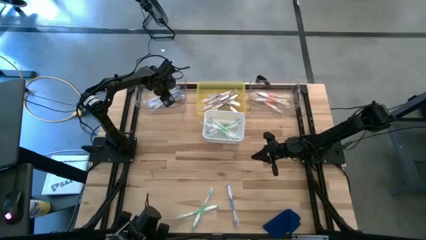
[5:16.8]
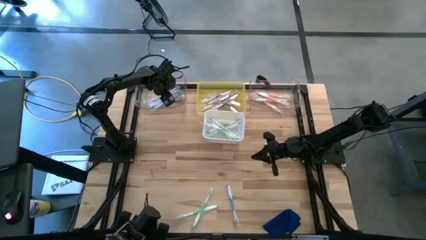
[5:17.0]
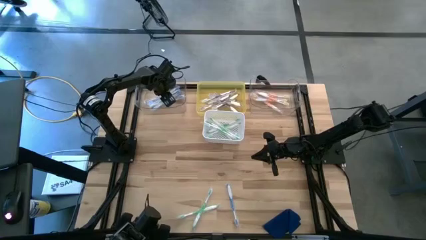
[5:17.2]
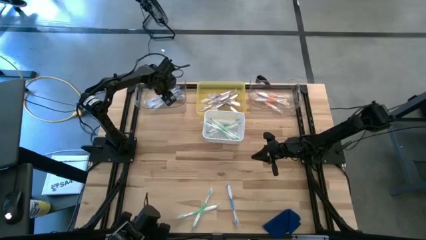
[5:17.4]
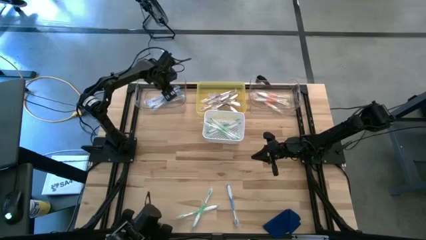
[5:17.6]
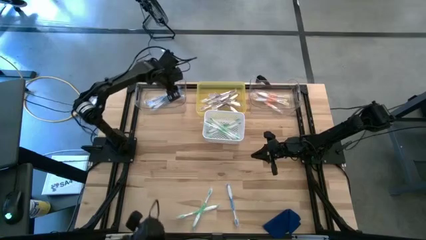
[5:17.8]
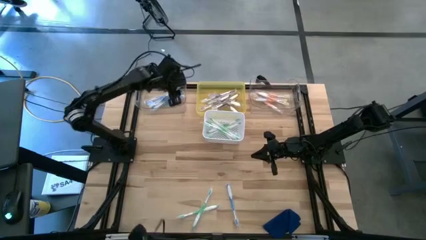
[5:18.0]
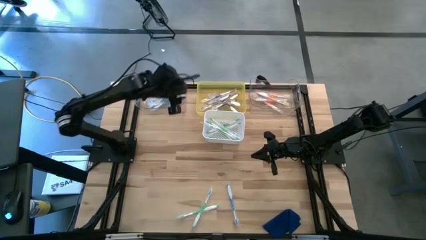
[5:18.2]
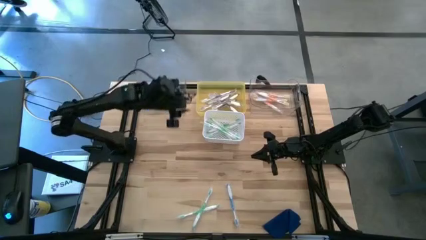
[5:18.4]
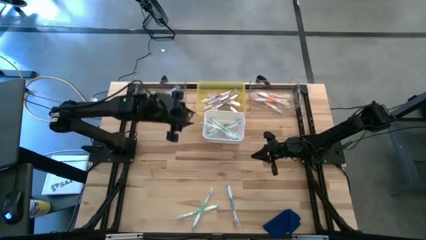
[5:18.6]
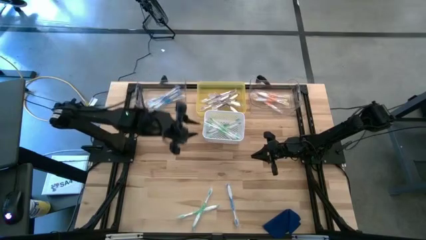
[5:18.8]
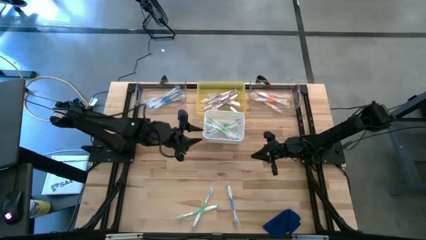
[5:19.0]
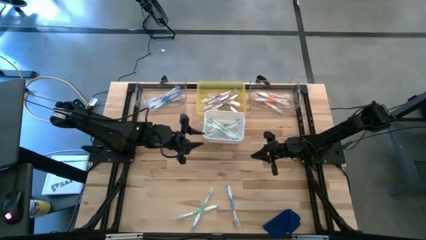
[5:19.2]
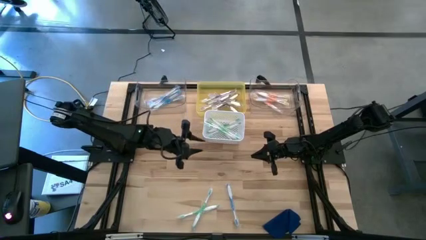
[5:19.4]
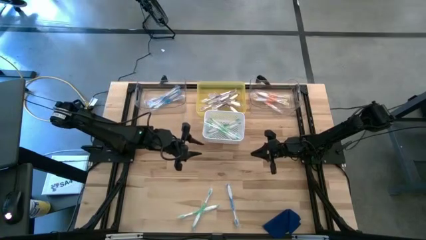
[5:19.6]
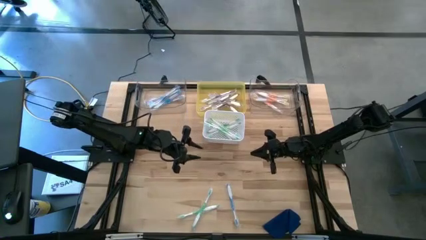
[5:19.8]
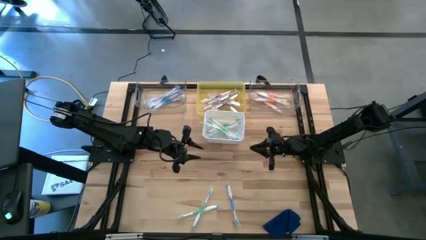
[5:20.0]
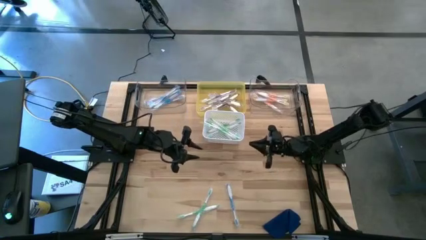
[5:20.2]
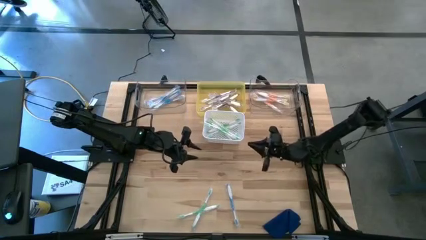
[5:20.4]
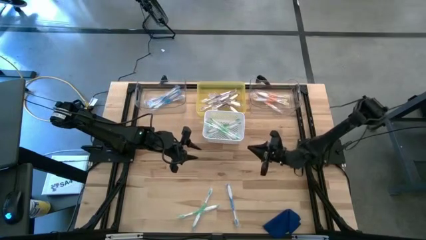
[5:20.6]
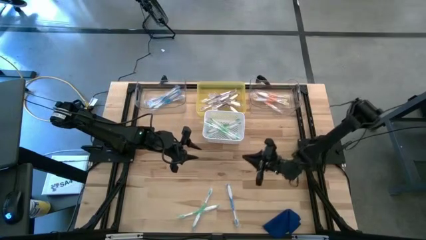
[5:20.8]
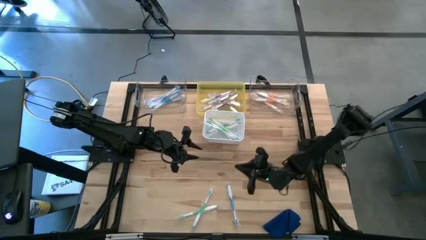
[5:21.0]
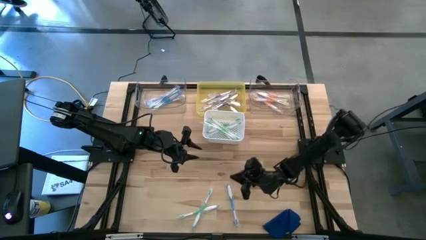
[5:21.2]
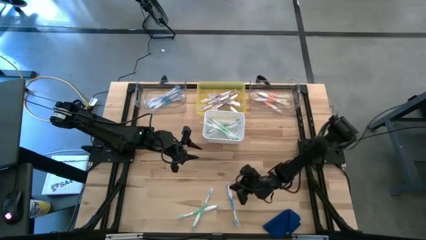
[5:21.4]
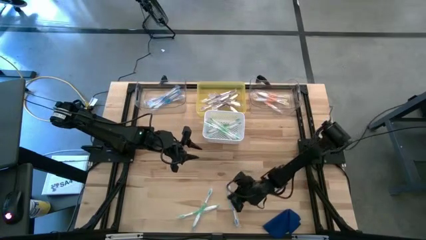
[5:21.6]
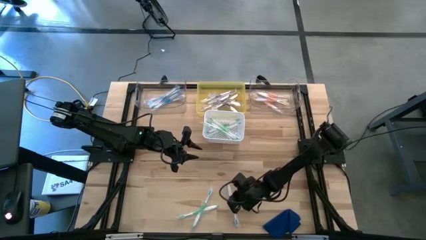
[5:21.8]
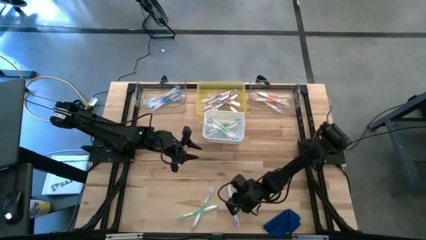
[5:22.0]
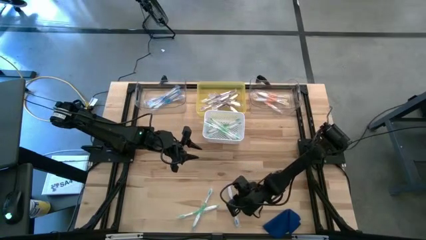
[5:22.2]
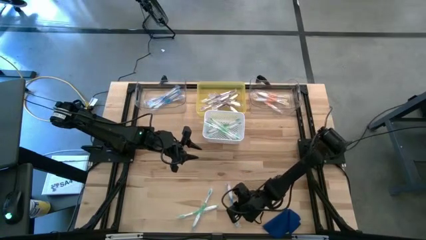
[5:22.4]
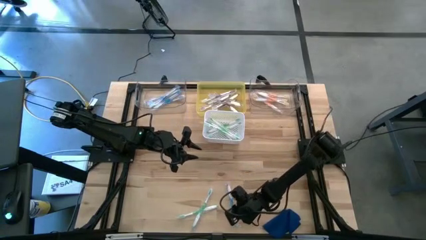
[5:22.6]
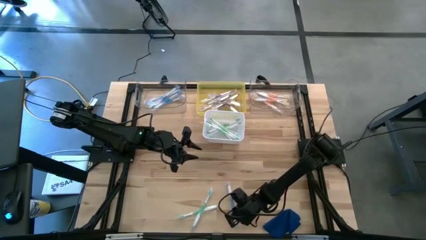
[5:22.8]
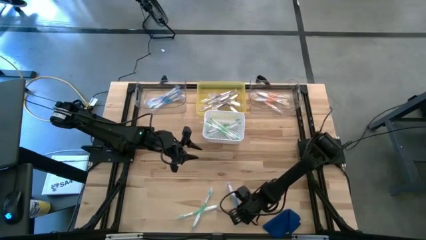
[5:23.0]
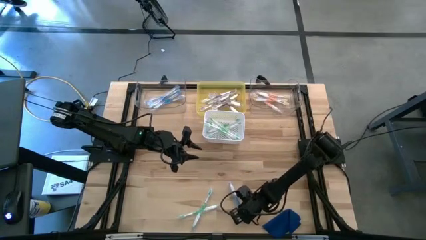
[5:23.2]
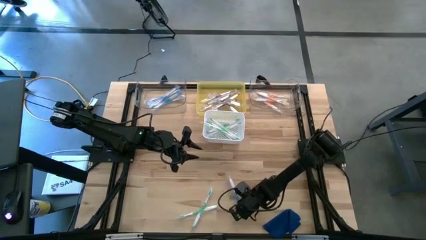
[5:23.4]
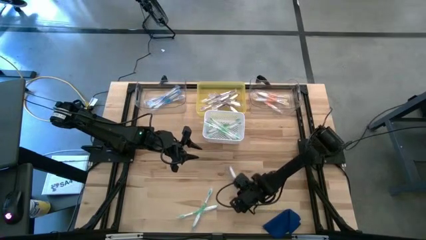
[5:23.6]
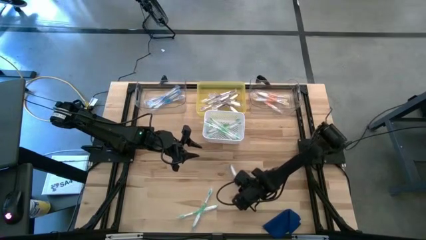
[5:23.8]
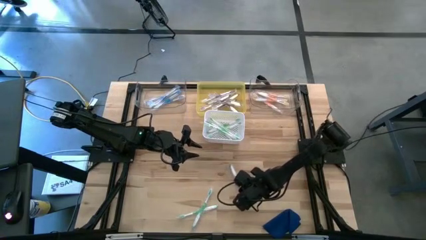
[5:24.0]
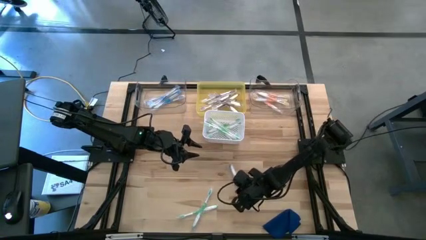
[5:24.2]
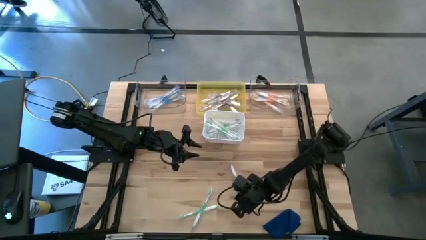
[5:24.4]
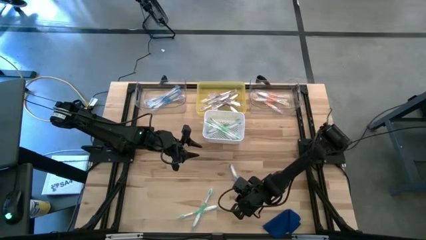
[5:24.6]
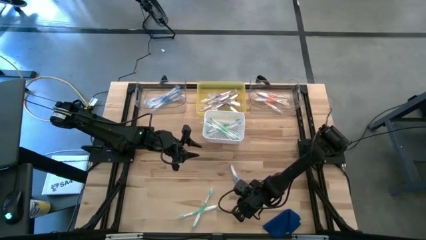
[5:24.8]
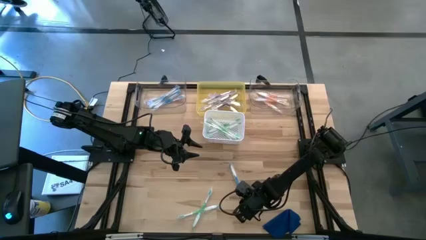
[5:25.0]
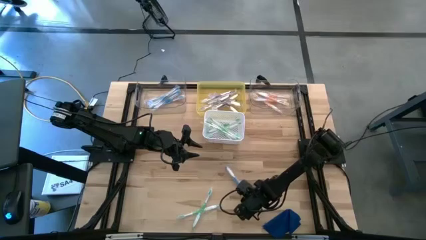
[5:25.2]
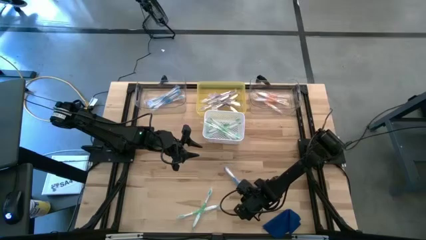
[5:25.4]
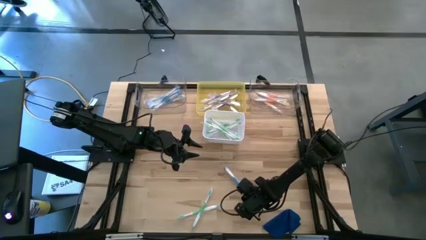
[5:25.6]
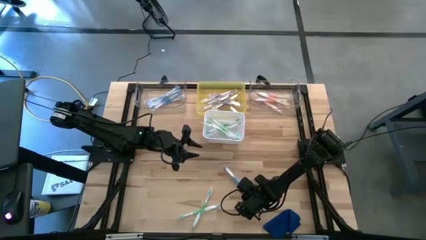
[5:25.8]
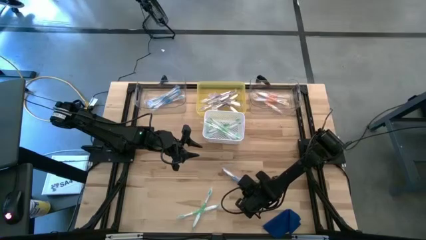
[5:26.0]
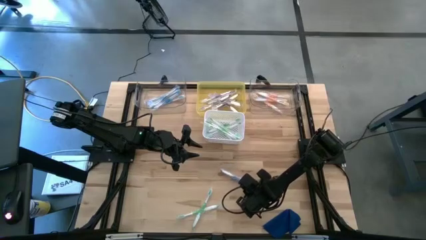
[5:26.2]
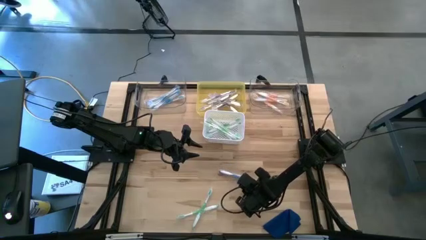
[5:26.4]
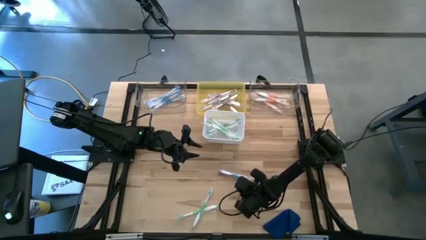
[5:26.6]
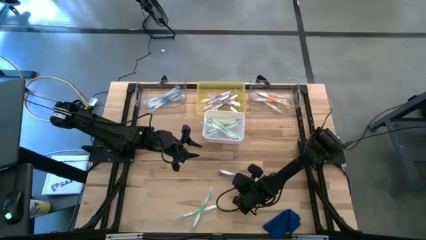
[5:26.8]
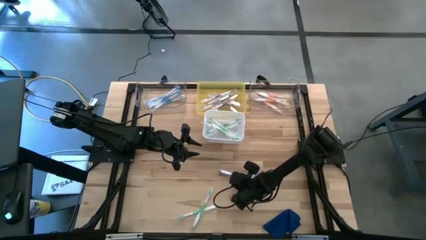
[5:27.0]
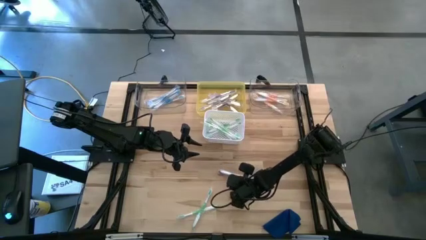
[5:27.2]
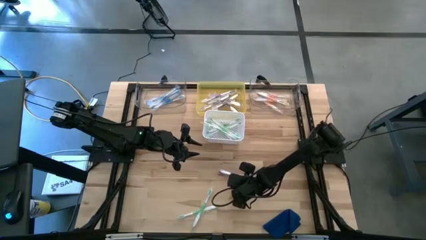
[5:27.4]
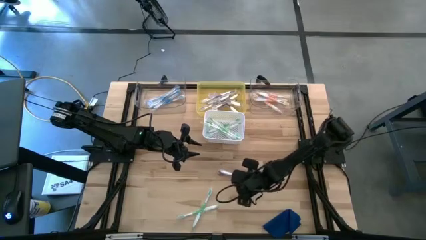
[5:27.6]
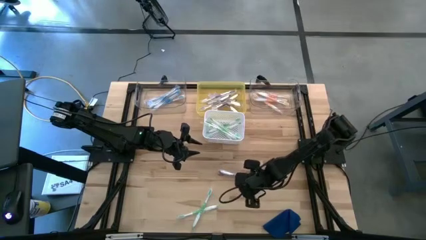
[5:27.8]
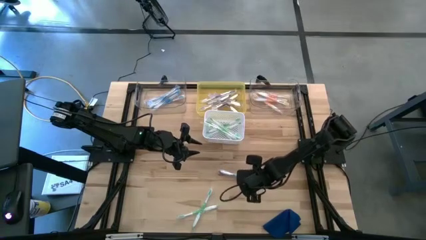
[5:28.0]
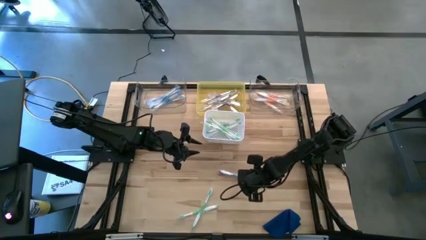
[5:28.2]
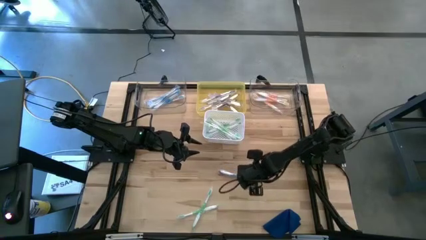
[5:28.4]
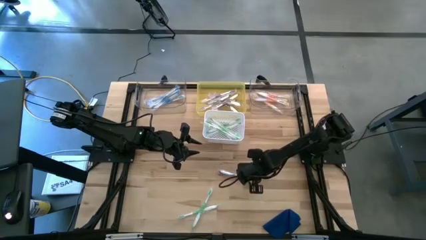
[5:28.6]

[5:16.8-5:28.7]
Task: Pick & Place Toothbrushes
Put the blue toothbrush into the left transparent bin

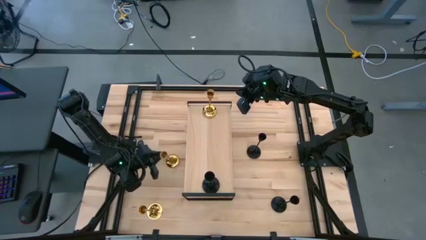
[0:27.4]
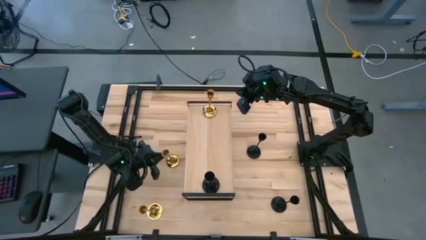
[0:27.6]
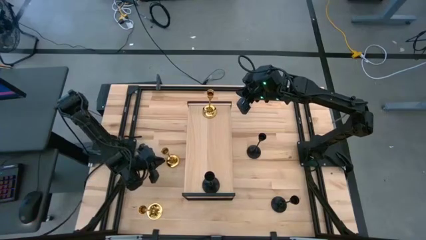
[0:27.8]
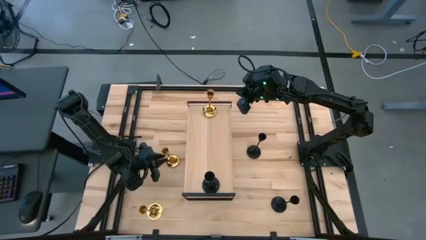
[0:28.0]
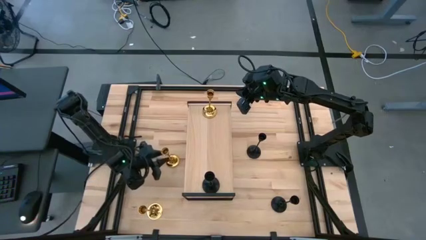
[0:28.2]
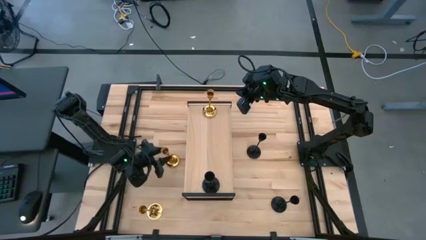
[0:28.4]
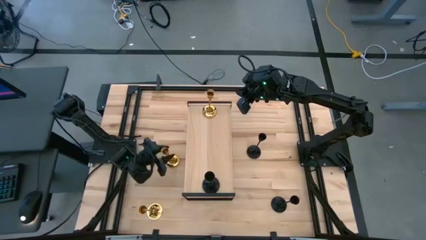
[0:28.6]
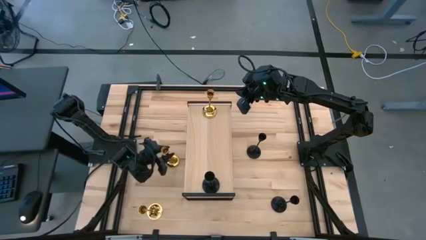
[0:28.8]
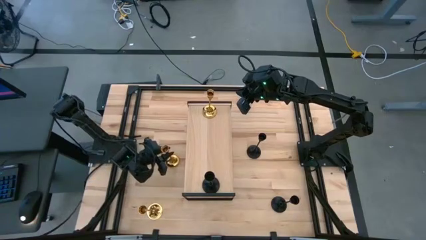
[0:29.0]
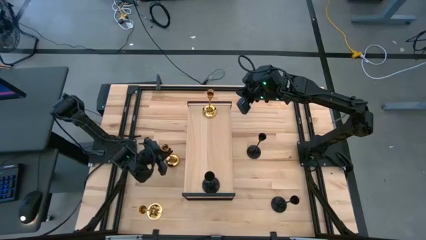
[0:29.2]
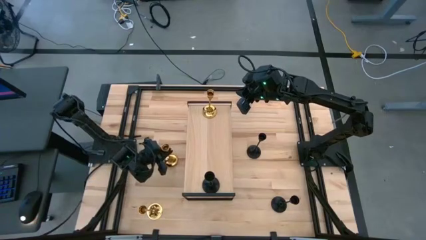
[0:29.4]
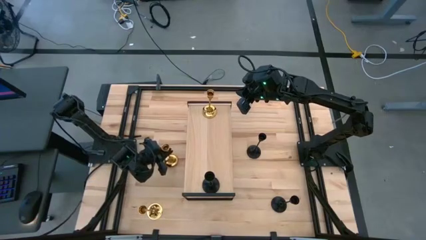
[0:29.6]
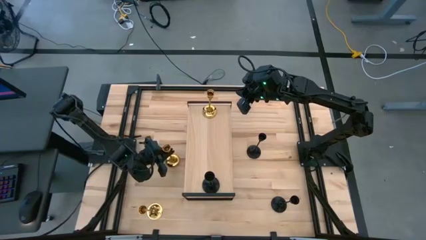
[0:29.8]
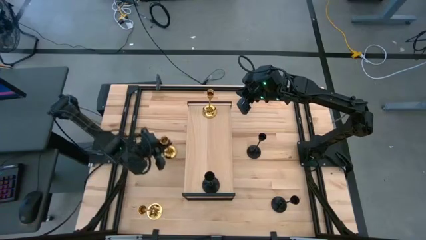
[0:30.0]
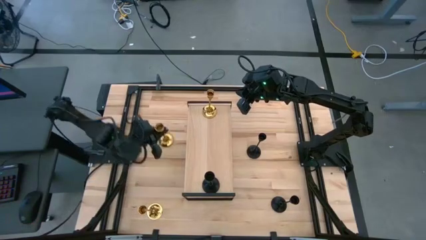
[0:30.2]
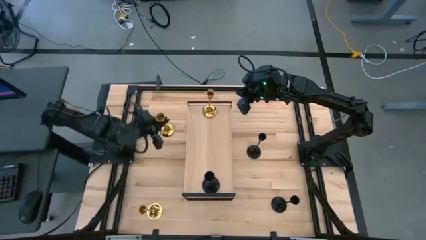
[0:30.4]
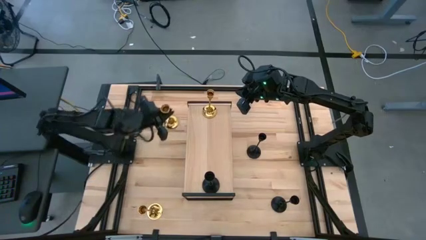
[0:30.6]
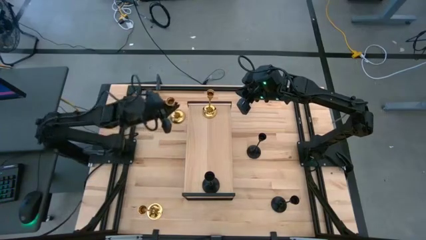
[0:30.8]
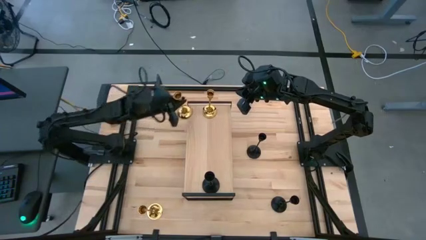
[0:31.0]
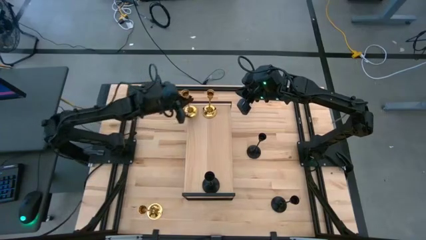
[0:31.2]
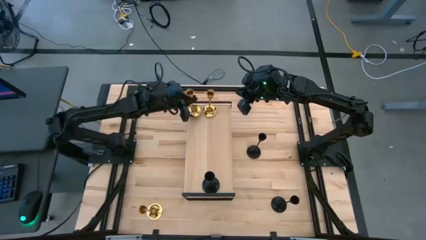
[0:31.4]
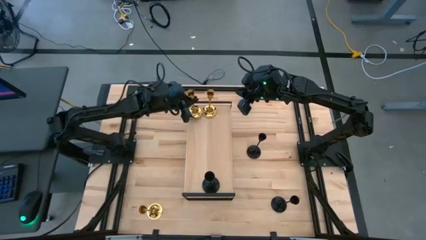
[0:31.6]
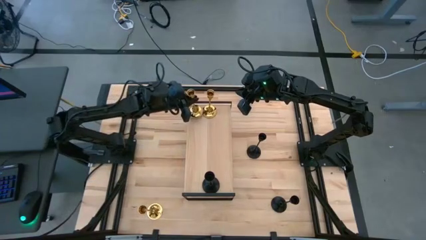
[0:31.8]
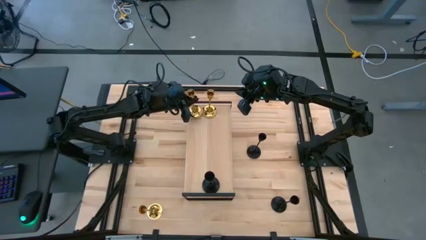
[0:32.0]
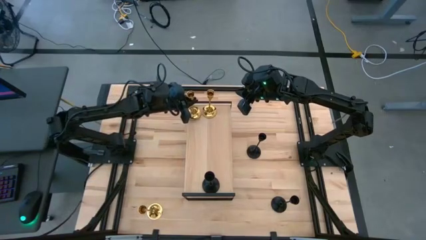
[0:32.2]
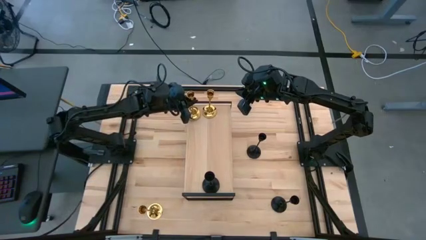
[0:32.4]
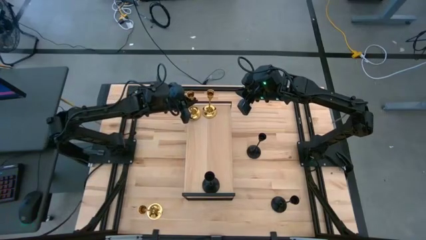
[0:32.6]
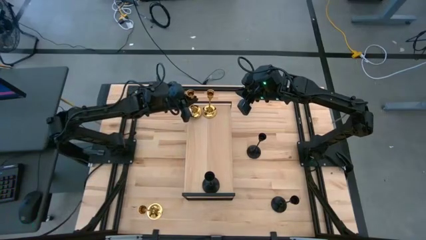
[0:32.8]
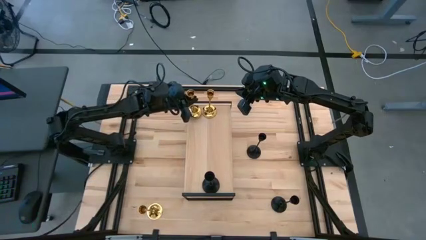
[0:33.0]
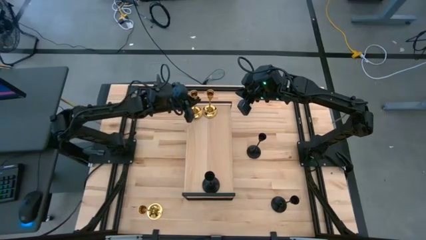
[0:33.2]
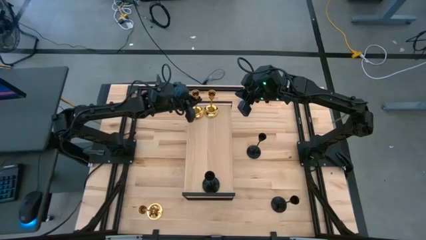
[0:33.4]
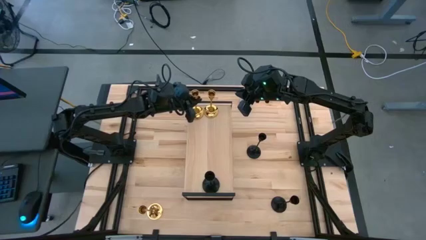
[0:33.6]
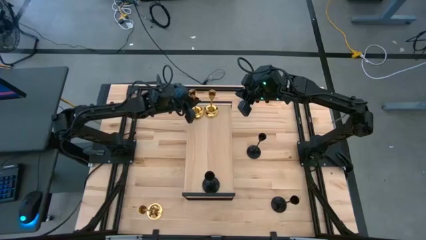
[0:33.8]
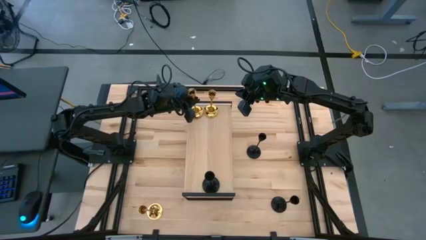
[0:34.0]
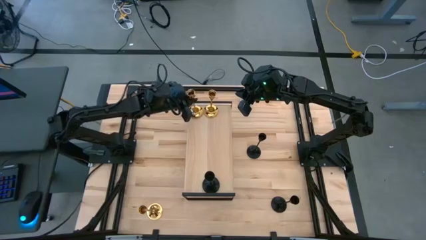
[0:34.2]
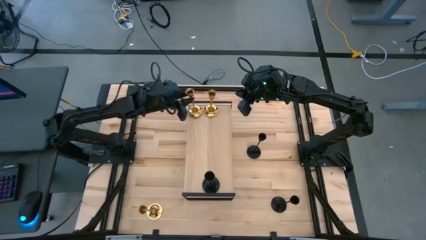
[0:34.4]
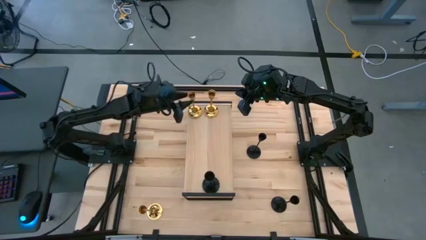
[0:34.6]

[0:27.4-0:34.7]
Task: Pick & Place candle stick holders
Put the top gold candle holder on the shelf aligned with the other gold candle holder
